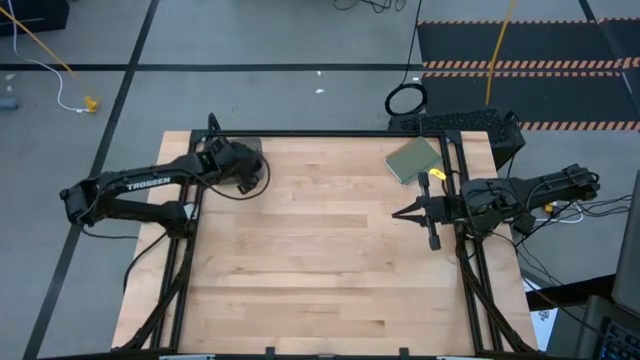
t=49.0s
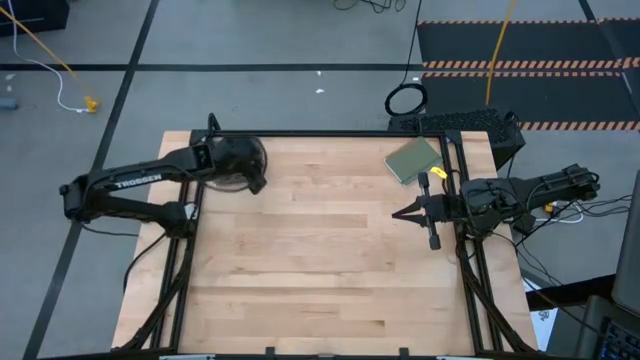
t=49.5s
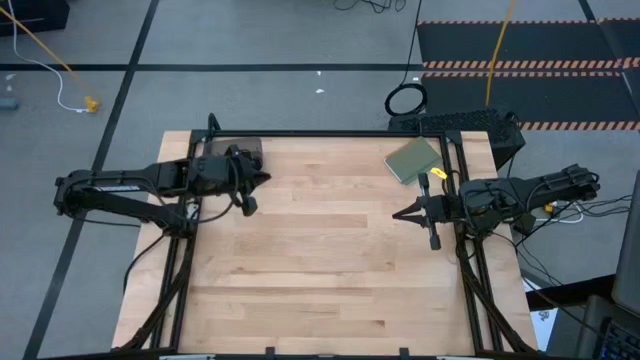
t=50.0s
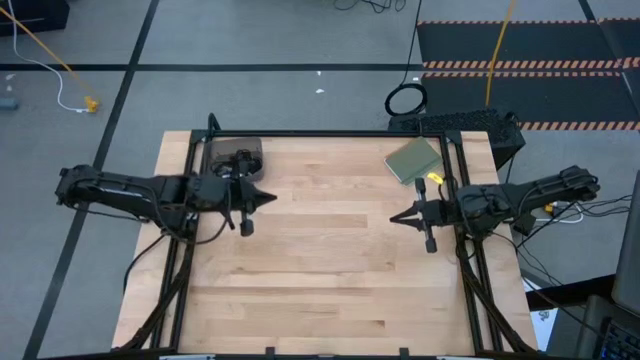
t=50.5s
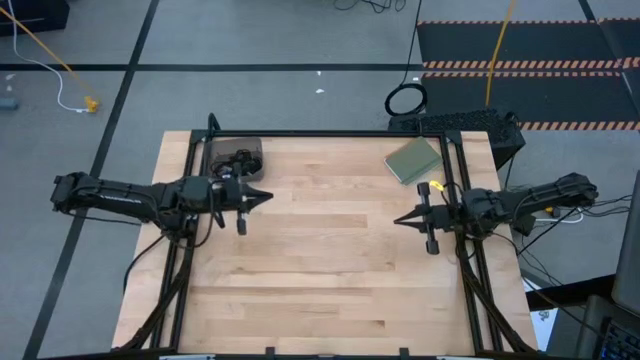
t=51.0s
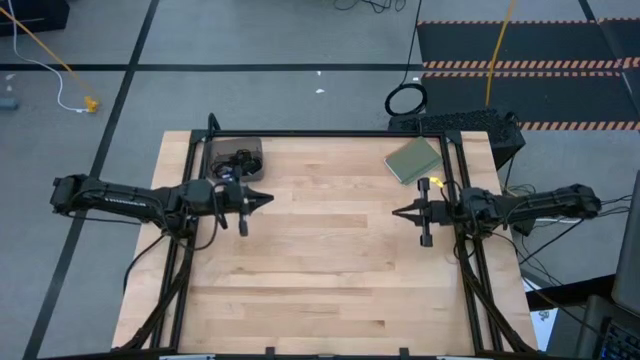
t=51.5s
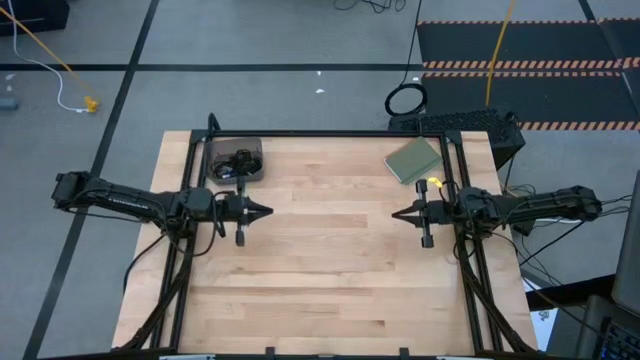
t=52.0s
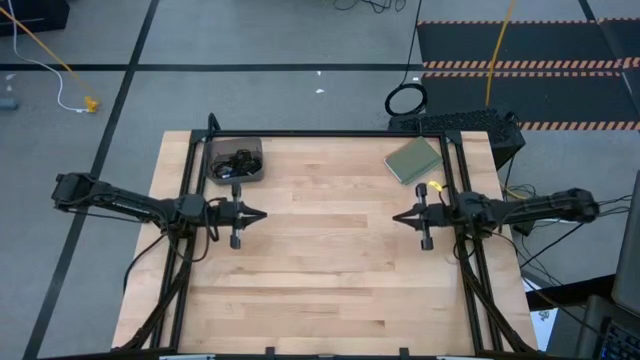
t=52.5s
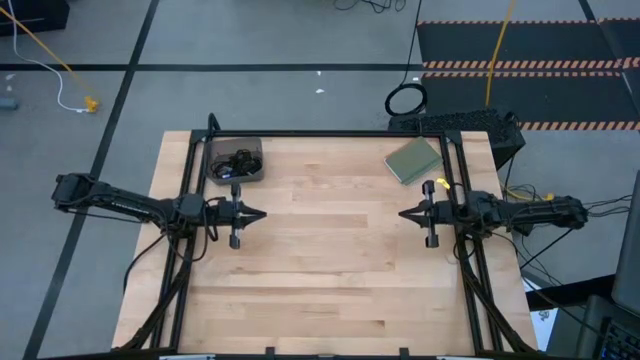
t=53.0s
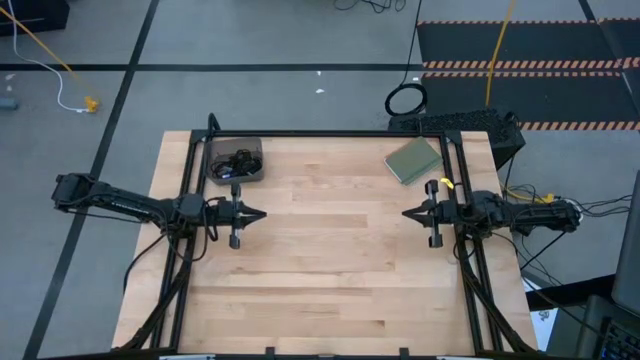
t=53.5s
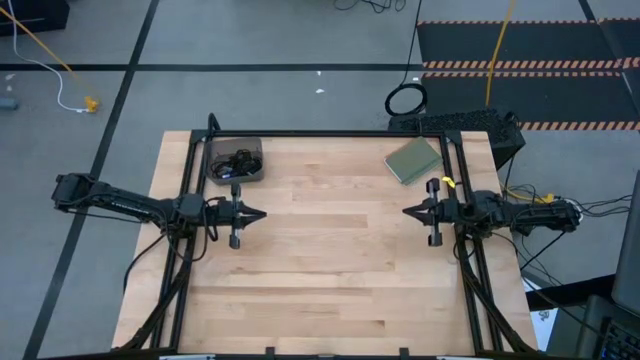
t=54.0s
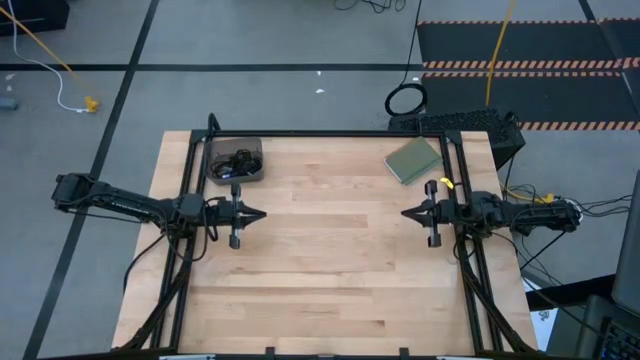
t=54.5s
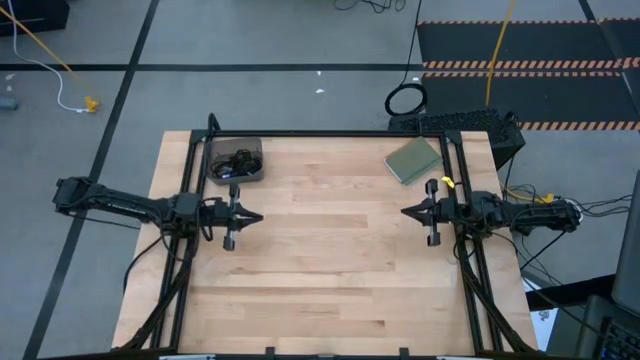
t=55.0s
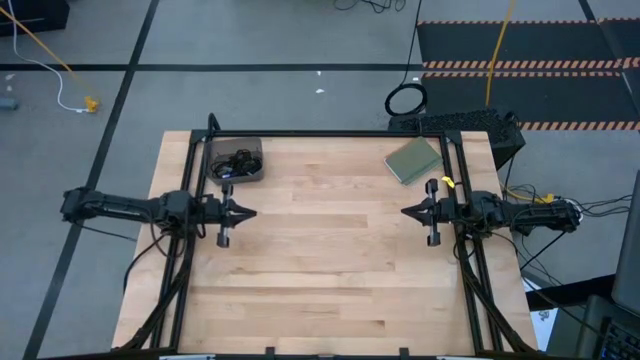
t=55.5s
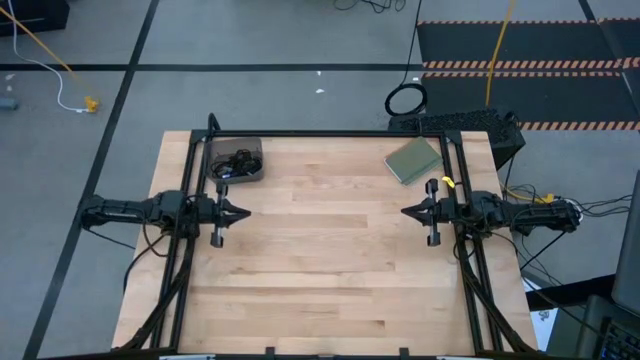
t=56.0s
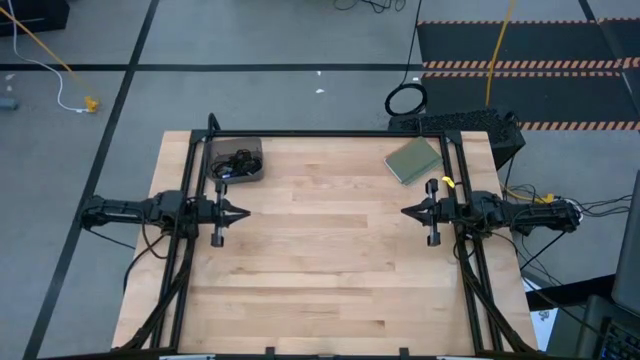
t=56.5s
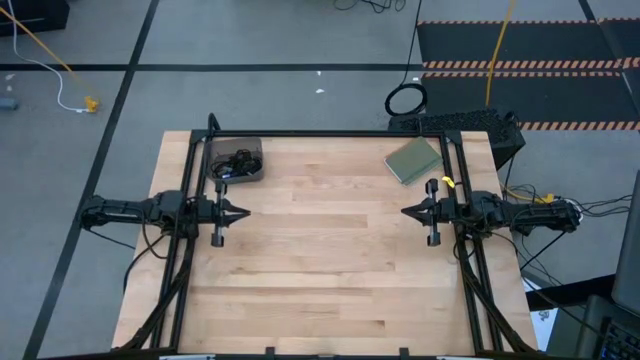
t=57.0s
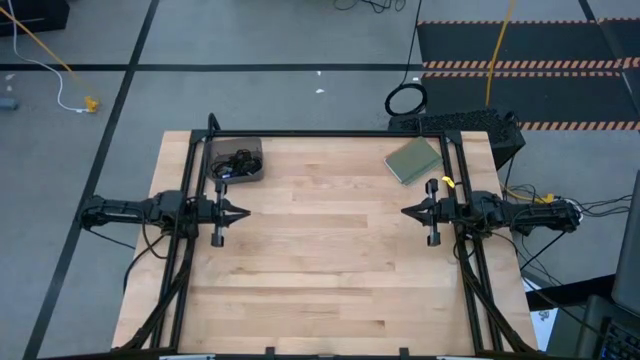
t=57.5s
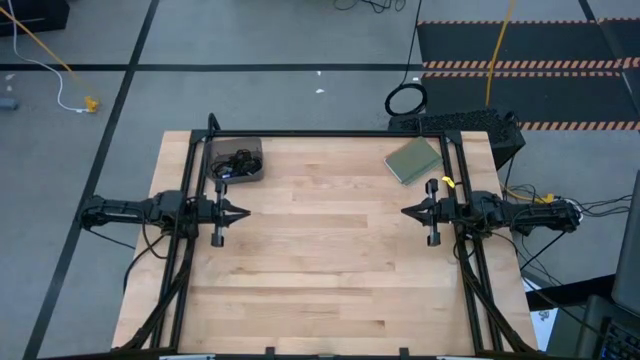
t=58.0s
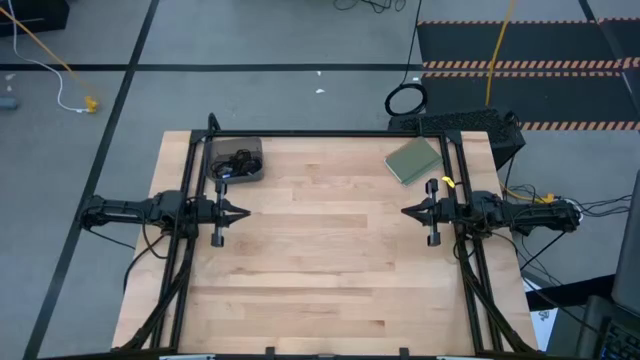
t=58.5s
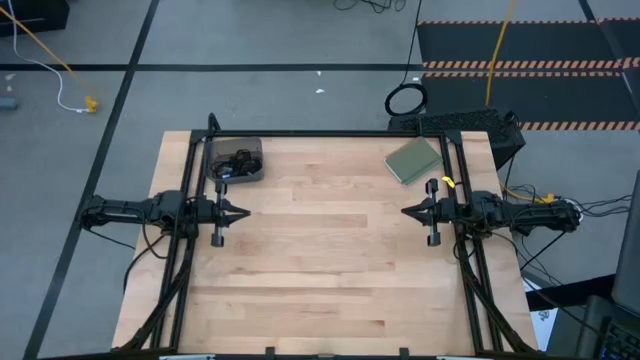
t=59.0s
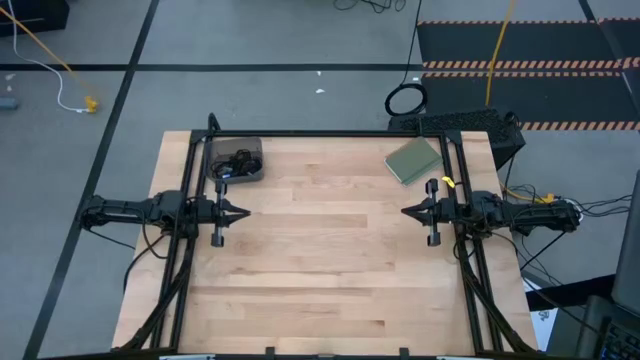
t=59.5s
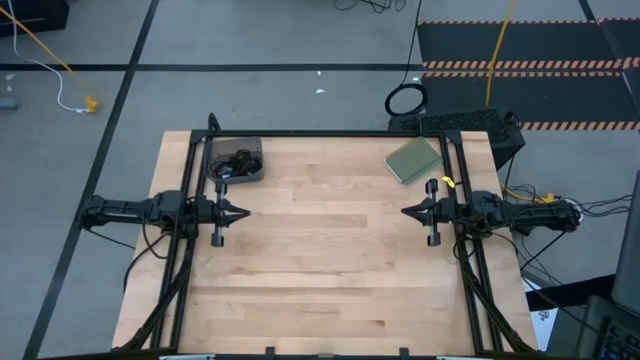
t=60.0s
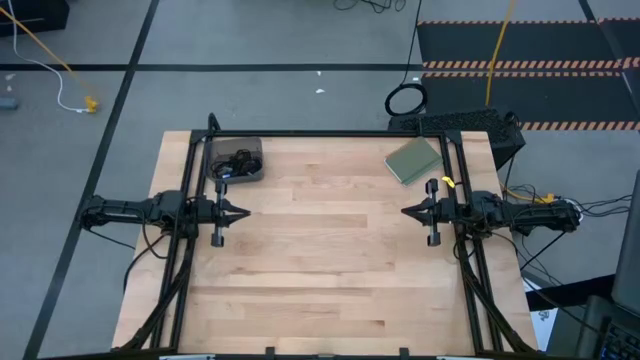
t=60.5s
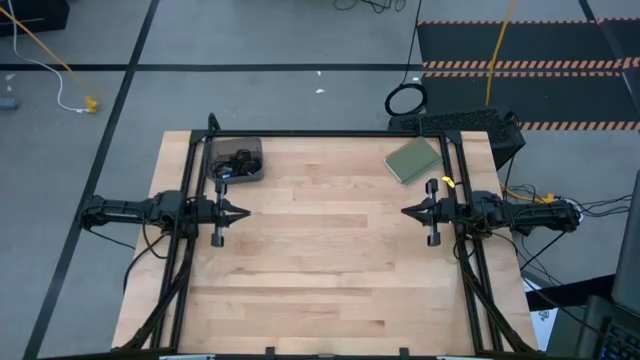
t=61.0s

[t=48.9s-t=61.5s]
Task: Pick and place USB-C Cables
Return to Home Position

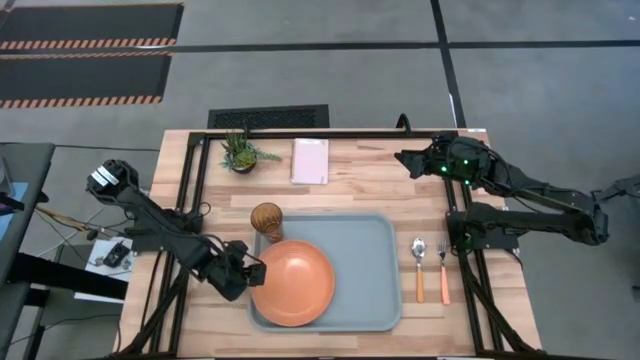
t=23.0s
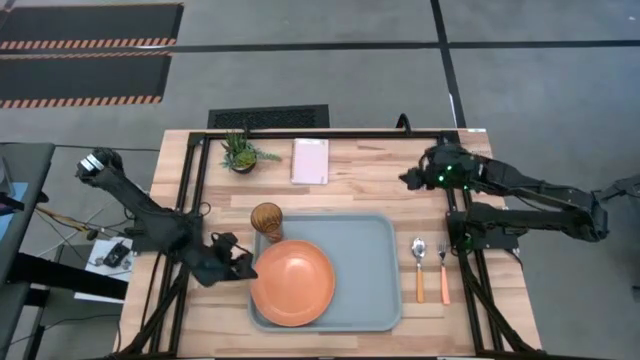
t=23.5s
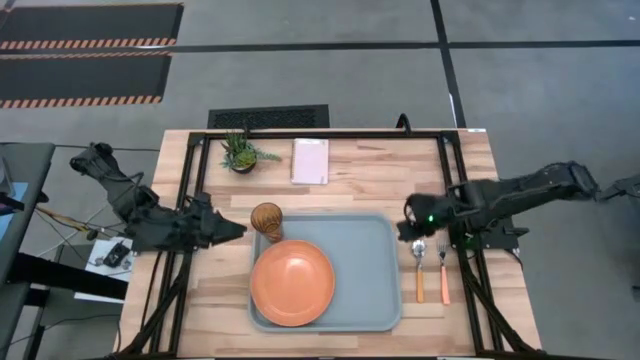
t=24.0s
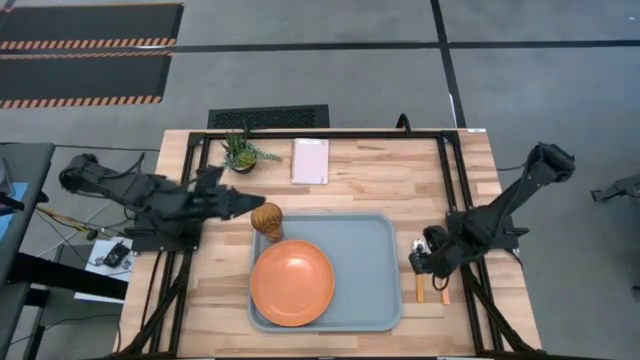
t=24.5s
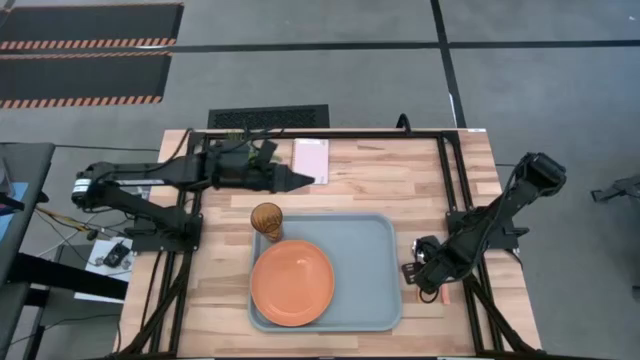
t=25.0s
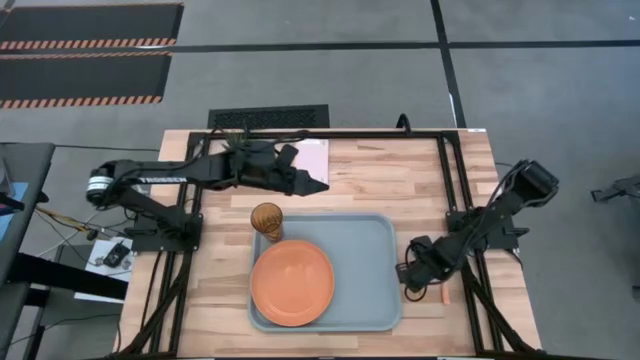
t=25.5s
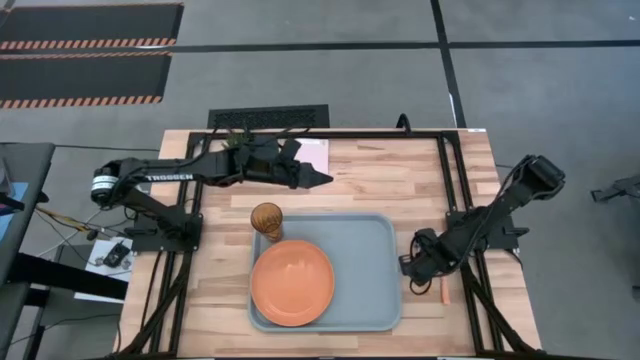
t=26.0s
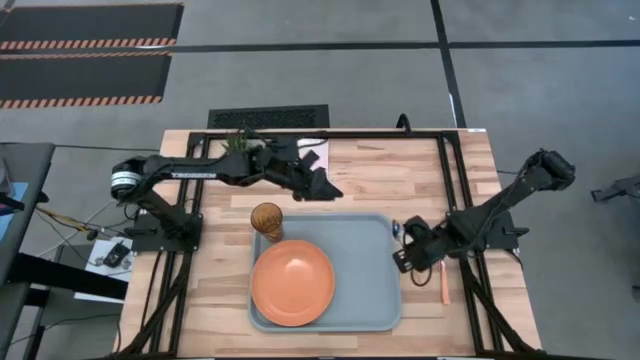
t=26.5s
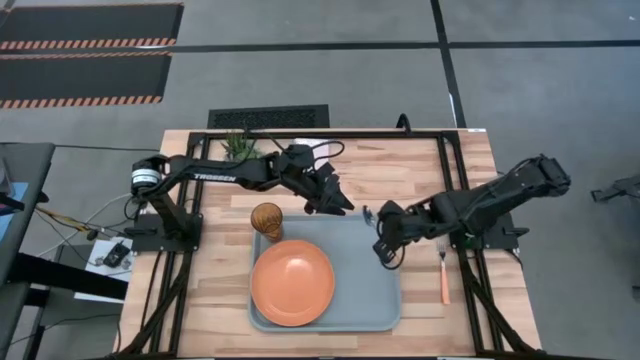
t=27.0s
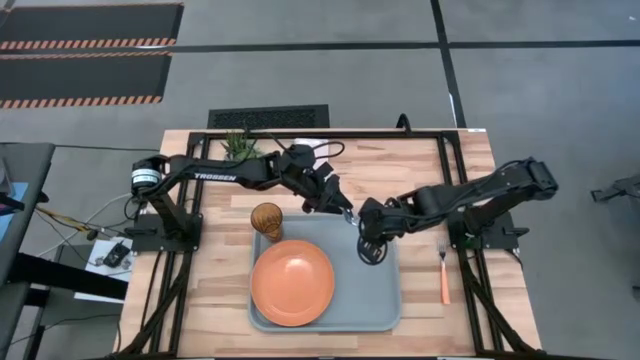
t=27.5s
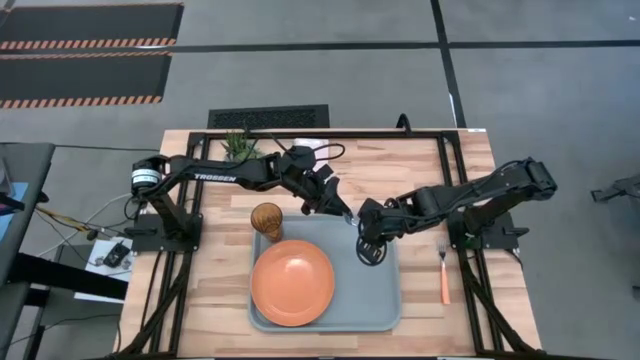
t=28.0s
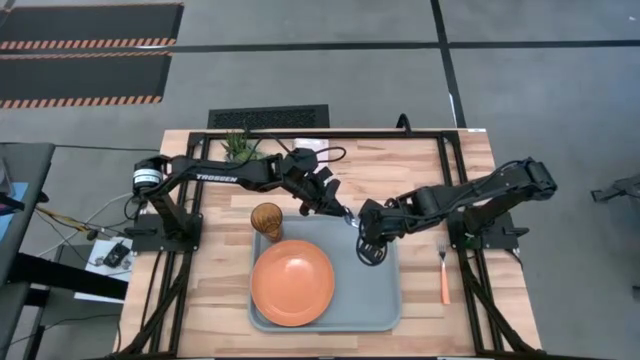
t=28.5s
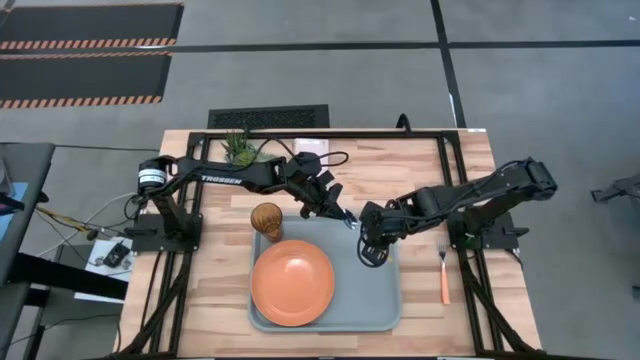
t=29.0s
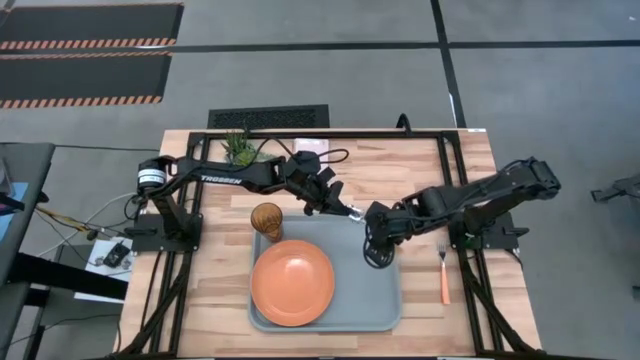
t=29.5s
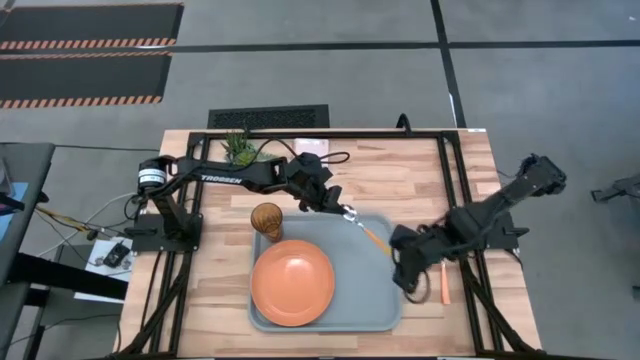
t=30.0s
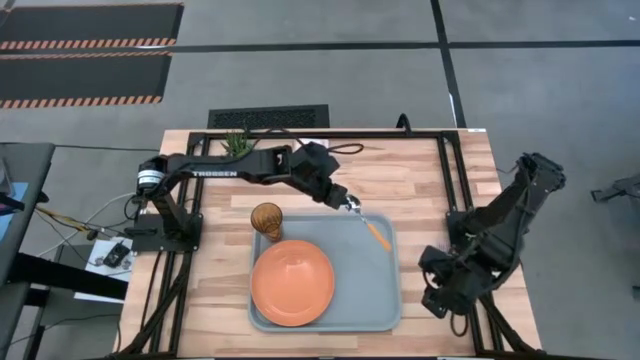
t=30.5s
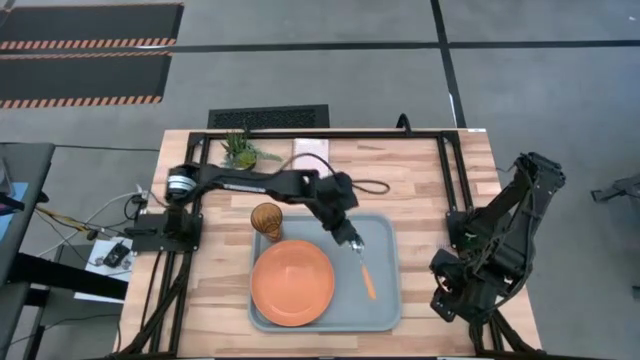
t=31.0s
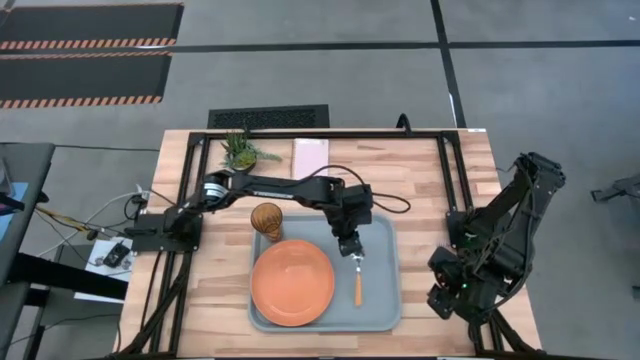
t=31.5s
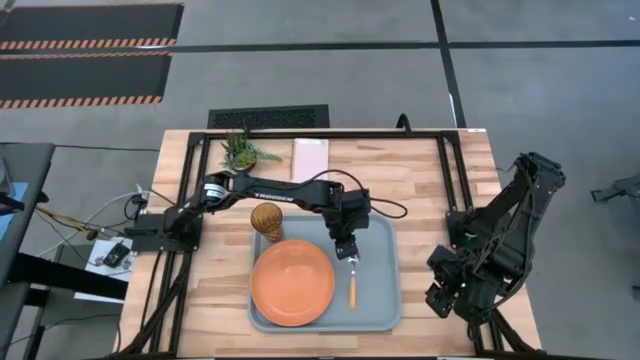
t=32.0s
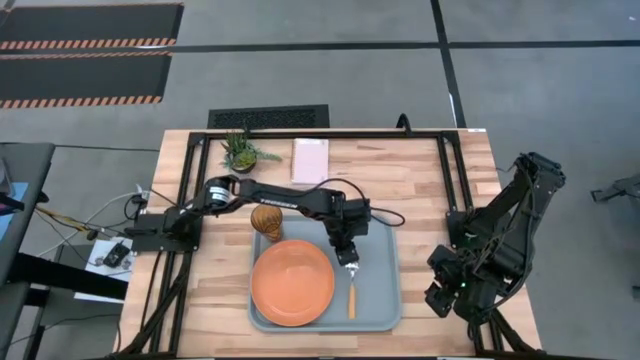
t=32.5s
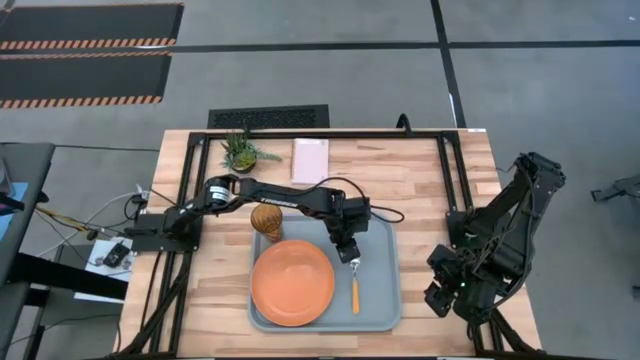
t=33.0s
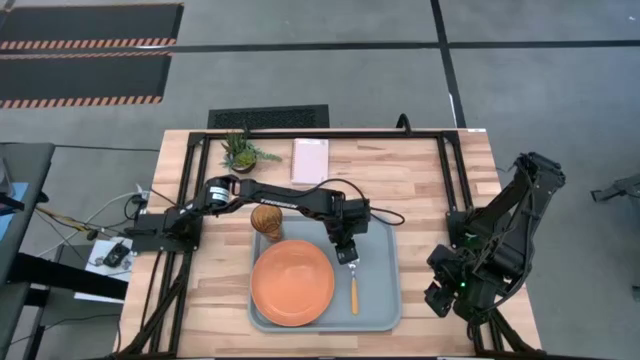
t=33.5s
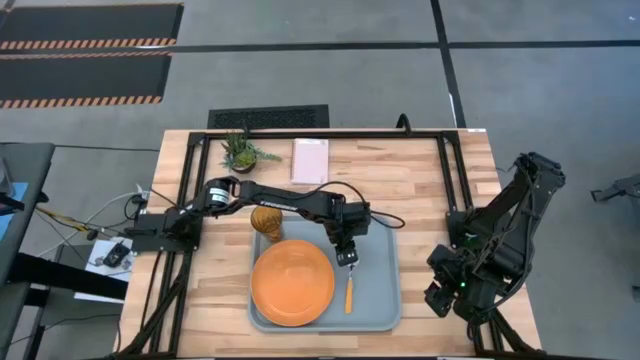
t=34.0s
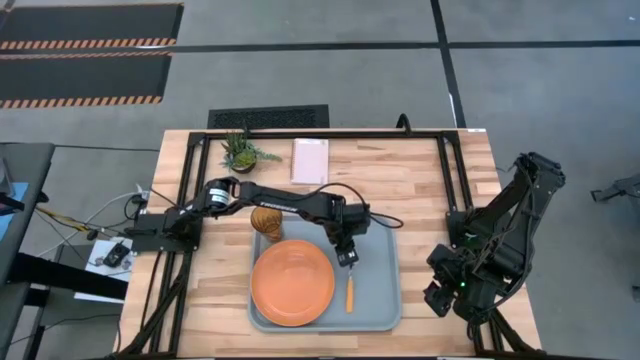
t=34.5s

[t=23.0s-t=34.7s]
Task: Pick and place plate/cup/fork/spoon on tray
Put the orange spoon on the gray tray to the right of the orange plate
